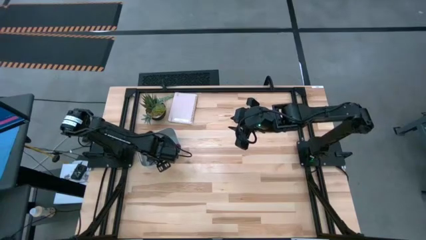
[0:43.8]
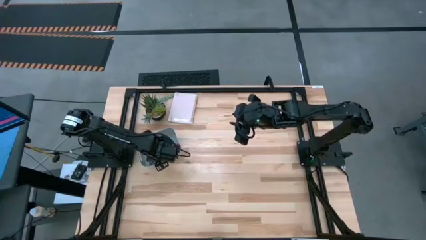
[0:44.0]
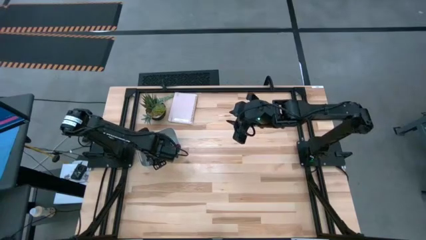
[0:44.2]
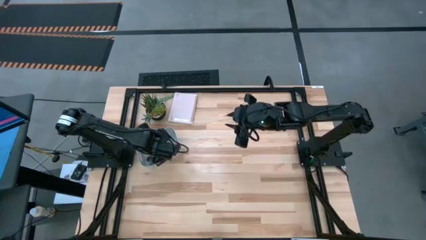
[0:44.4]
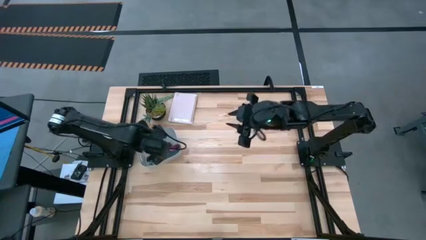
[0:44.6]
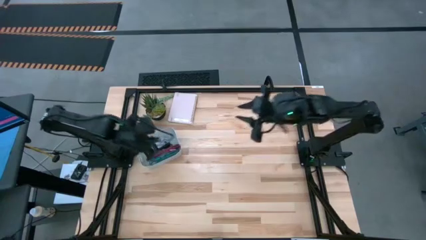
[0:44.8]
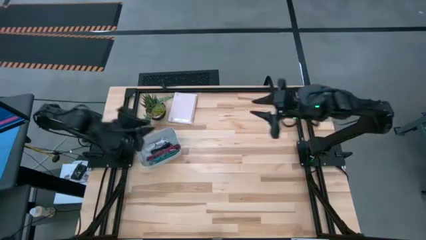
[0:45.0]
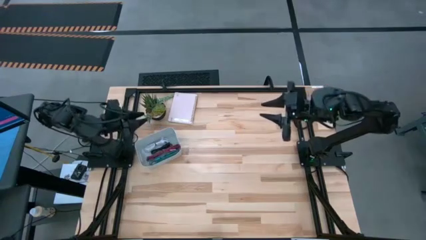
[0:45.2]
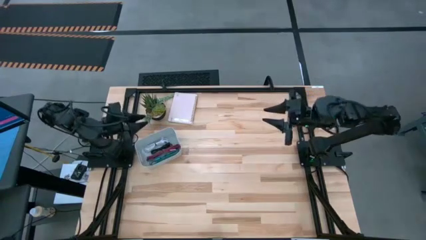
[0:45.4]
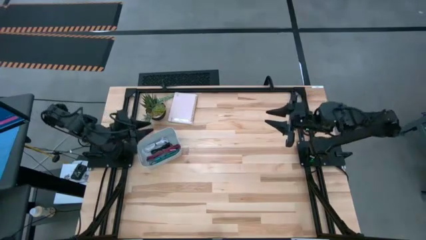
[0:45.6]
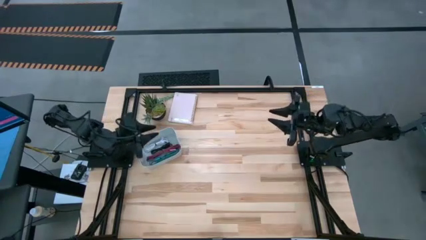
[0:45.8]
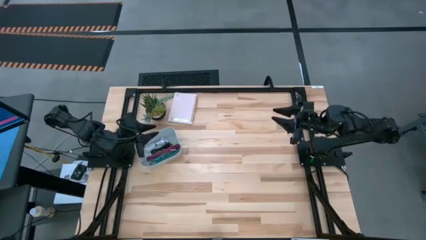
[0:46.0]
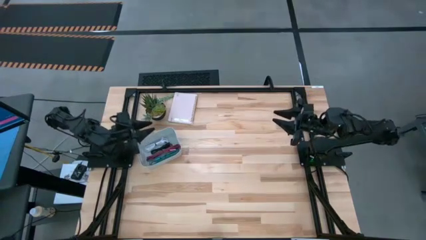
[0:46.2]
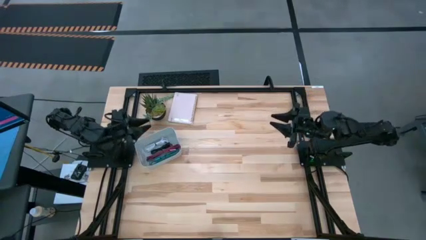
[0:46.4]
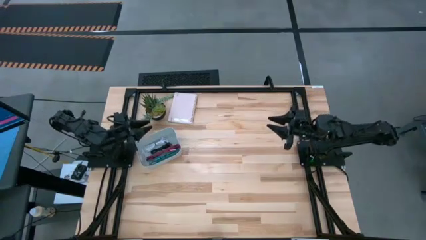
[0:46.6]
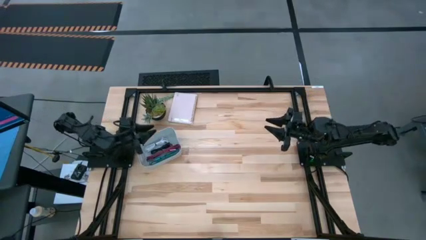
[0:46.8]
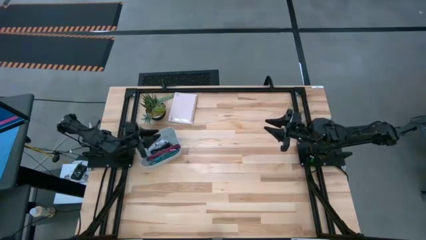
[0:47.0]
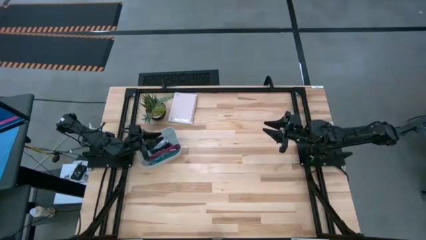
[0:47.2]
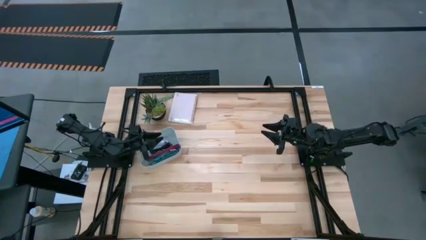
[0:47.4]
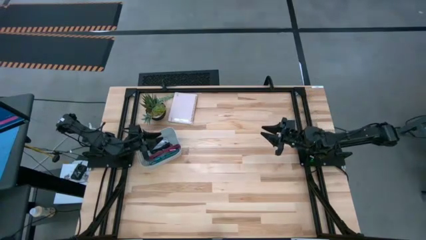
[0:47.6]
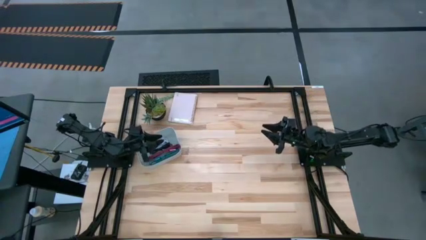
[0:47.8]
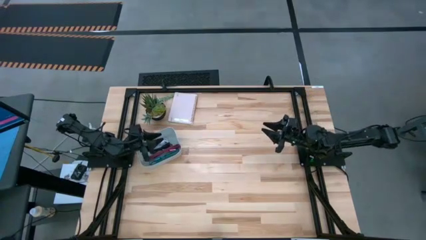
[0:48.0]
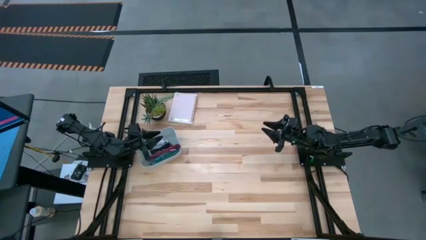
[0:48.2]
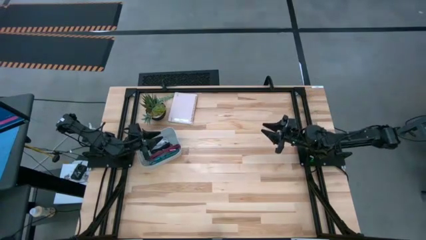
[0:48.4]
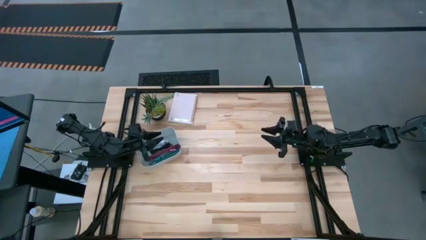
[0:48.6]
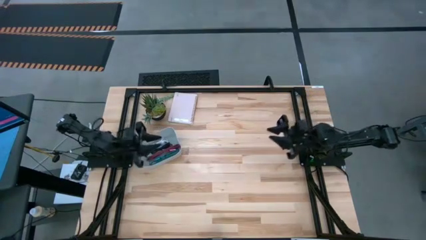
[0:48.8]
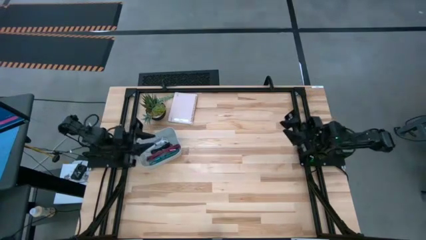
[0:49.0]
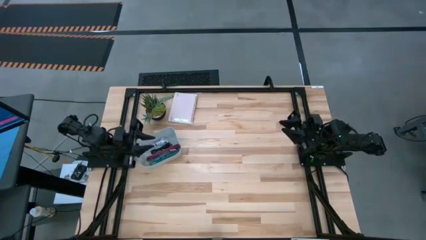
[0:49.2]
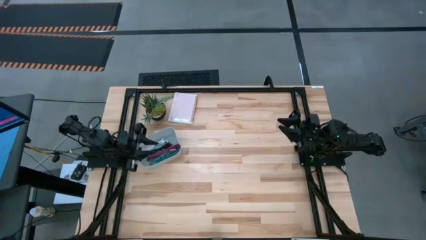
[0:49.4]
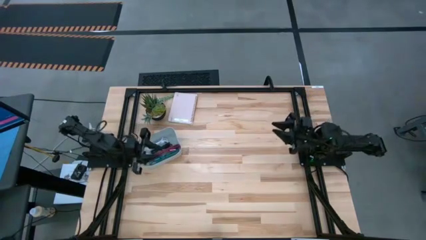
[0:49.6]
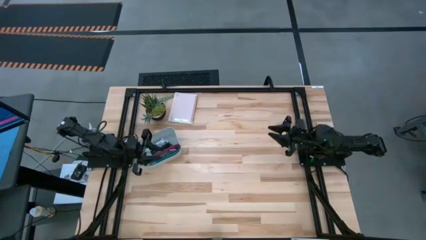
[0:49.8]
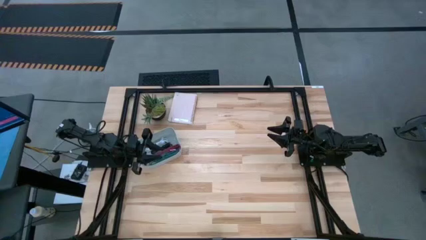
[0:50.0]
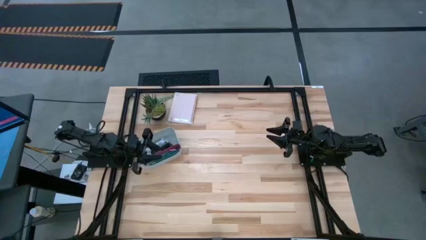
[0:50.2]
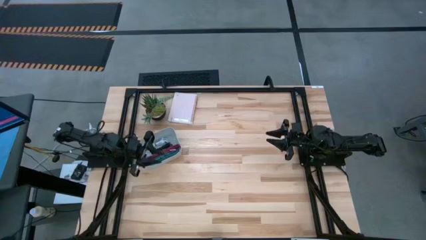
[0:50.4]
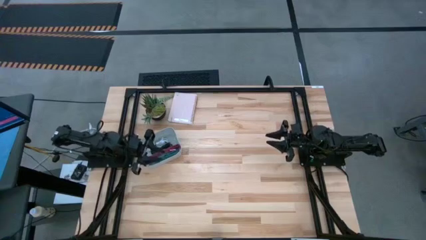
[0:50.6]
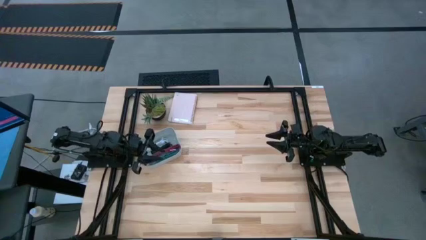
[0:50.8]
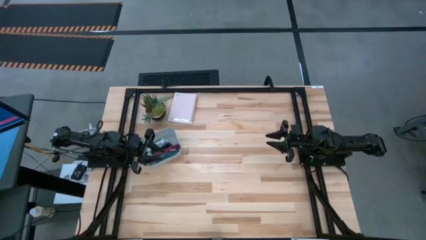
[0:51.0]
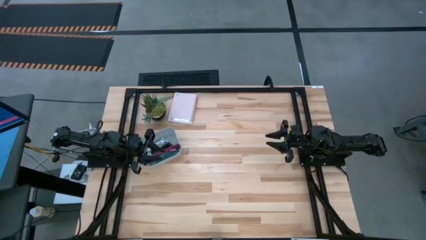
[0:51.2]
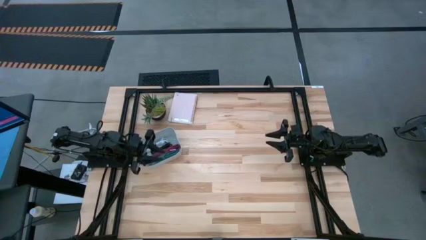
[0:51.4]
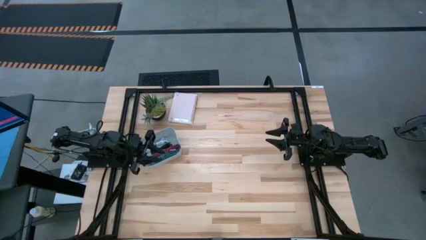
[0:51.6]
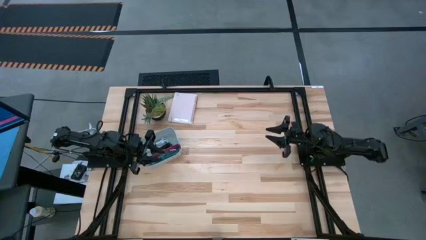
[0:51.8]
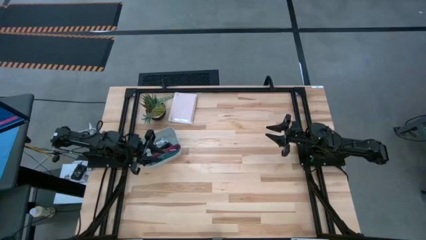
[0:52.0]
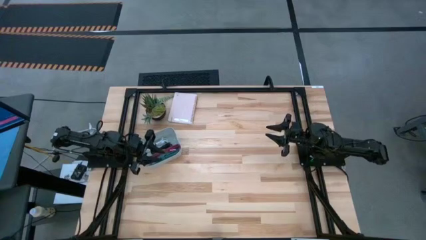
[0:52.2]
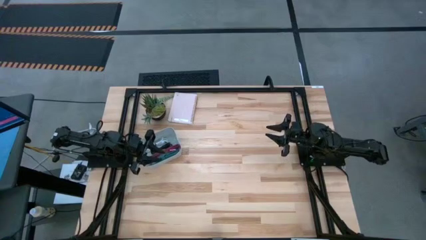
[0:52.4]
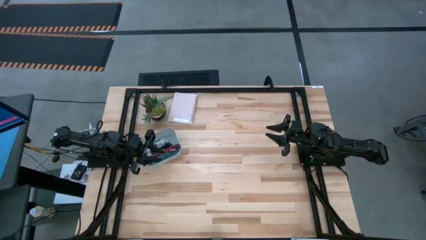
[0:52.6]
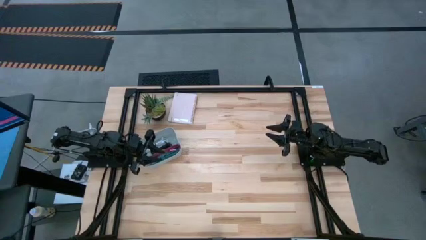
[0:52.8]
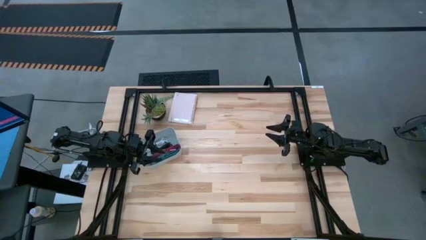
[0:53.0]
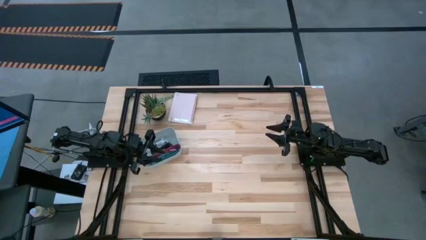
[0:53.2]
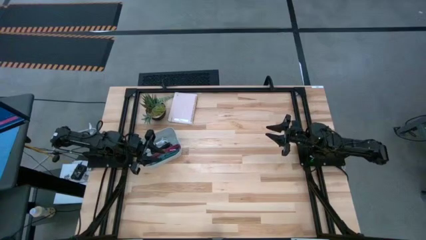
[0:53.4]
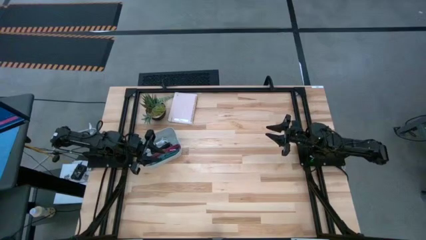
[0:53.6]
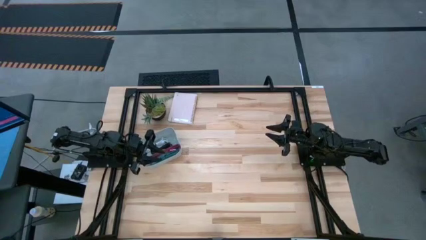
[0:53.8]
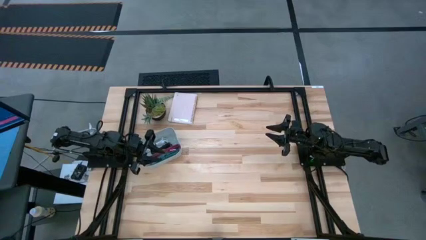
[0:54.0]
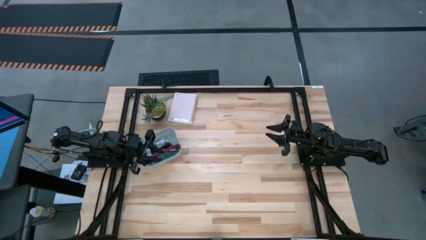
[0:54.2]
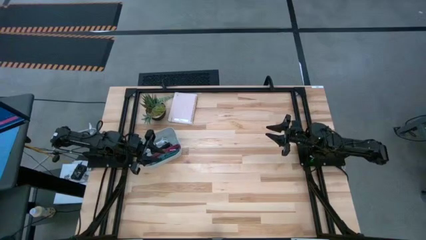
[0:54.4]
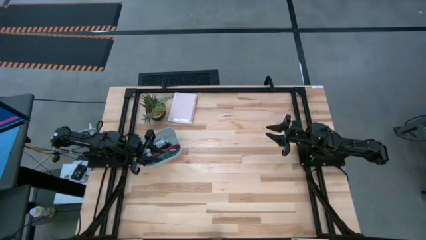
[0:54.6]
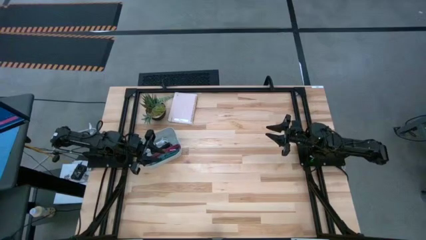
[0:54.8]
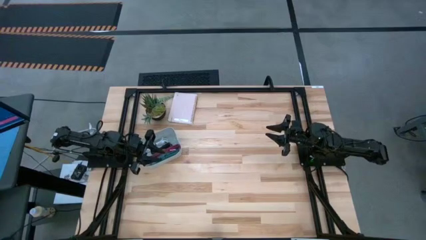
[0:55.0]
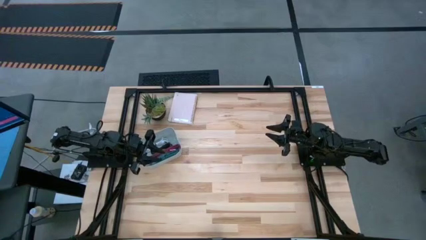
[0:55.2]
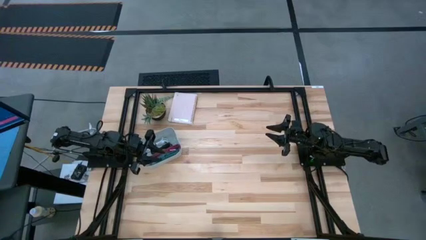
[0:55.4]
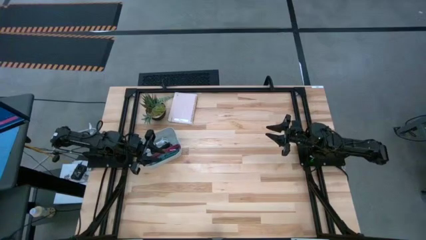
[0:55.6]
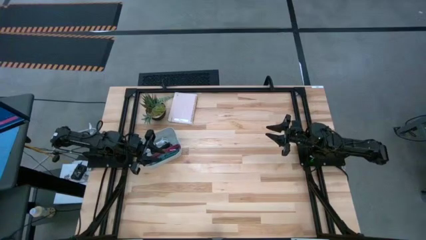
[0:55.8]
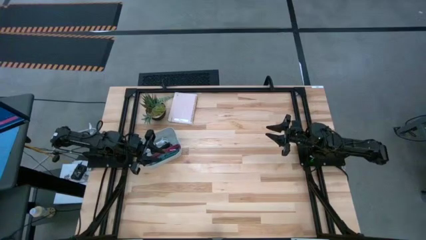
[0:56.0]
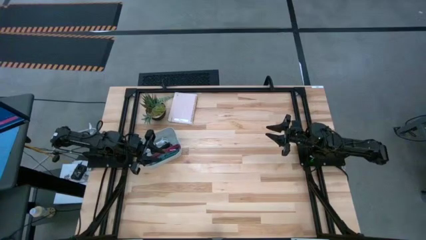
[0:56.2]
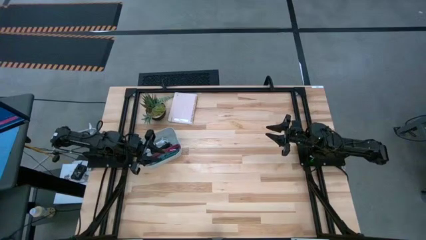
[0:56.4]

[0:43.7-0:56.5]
Task: Pick and place USB-C Cables
Return to Home Position
